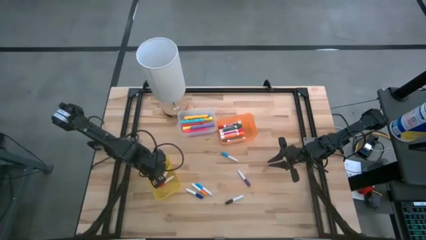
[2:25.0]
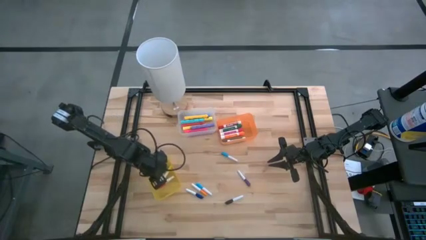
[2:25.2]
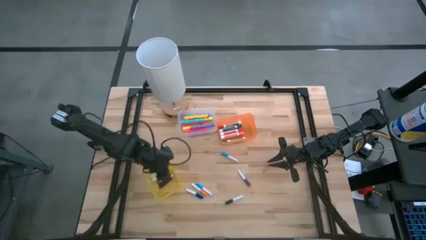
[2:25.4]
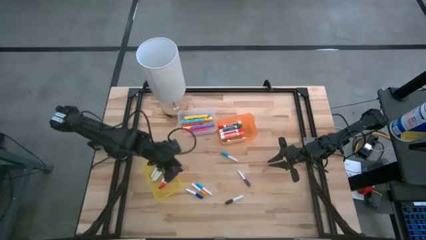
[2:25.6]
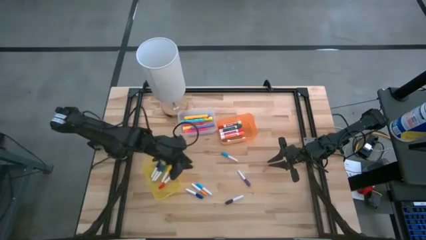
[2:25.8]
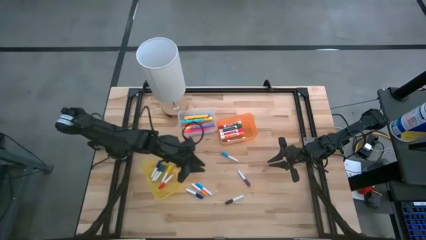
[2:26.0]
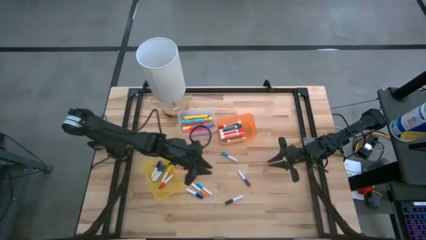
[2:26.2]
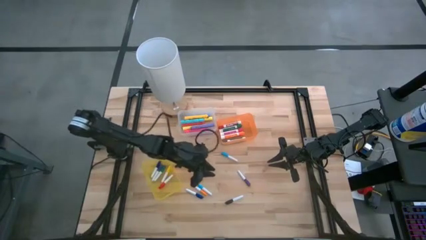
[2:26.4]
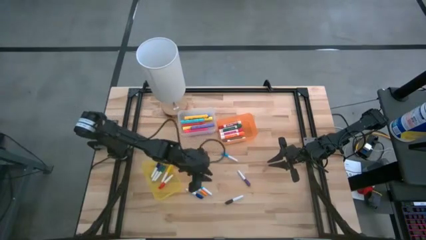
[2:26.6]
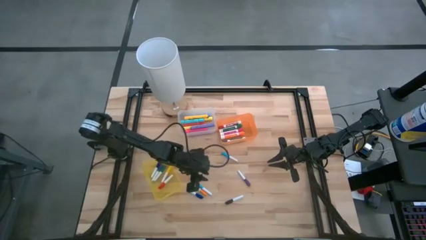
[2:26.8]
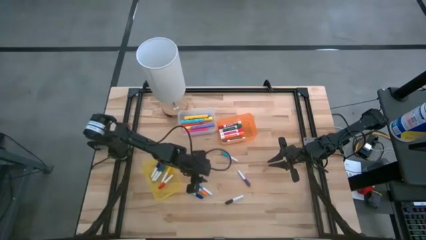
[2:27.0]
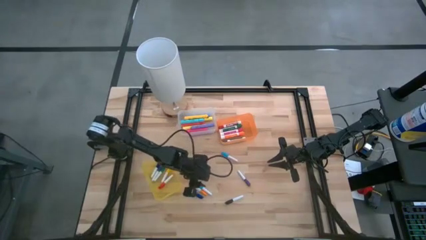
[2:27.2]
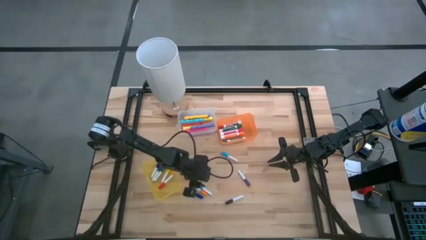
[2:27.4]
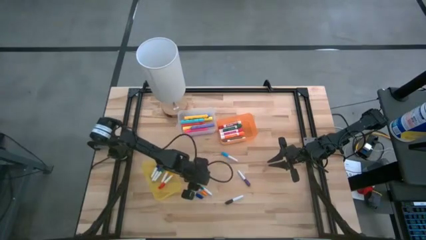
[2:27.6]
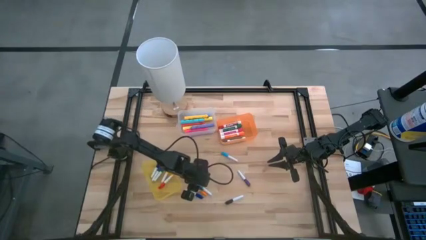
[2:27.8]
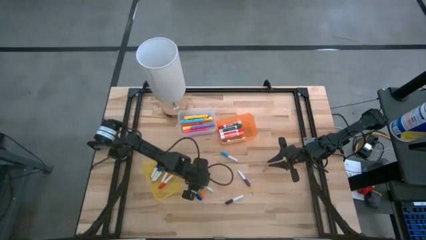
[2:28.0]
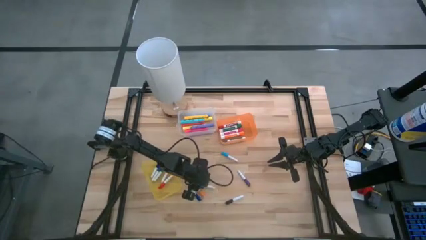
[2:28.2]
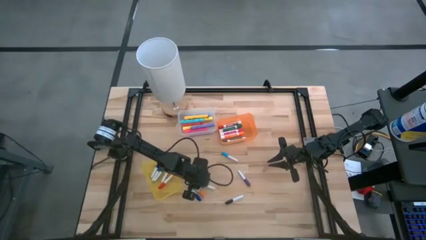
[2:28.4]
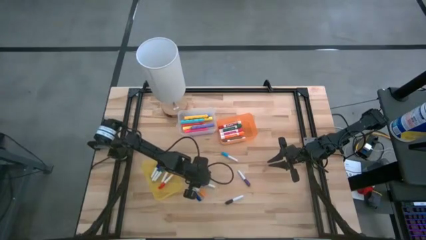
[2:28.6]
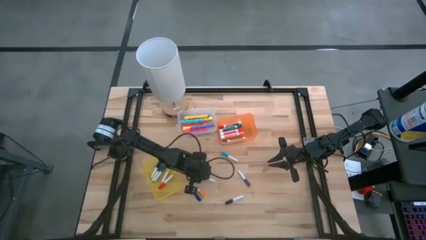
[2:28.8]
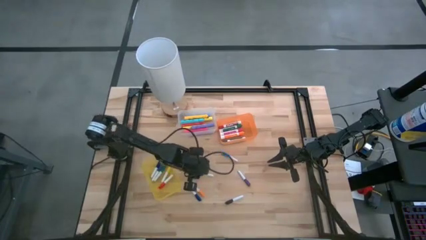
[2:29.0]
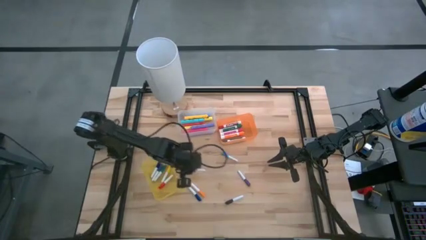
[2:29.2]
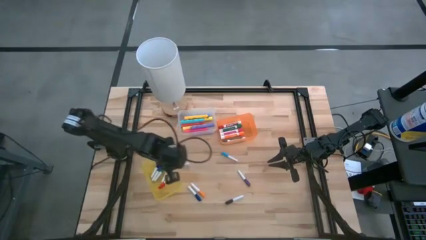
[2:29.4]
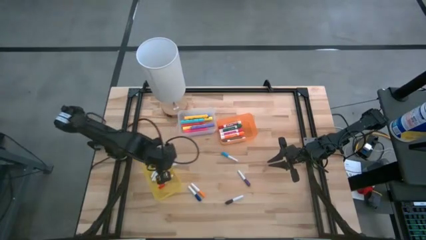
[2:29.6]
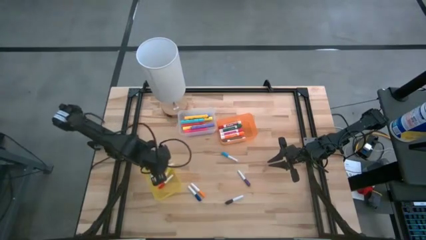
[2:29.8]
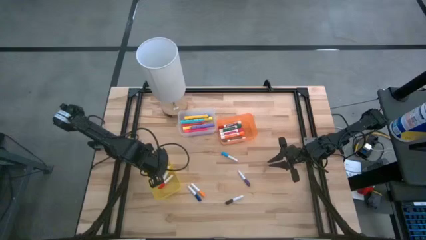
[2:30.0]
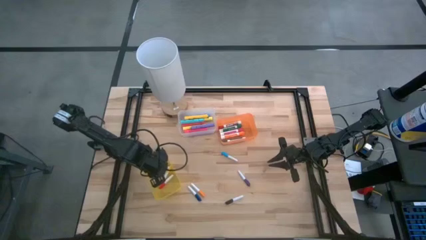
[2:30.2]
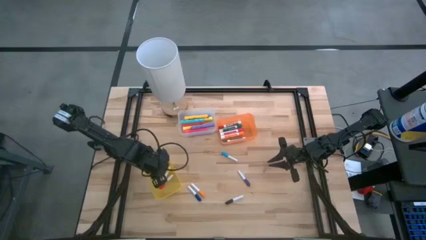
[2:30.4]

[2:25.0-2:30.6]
Task: Pick & Place Markers
Put the bottom light blue pen into the yellow bin

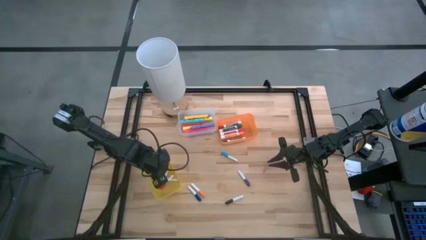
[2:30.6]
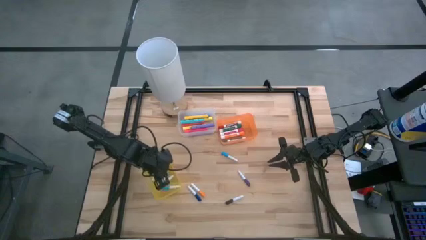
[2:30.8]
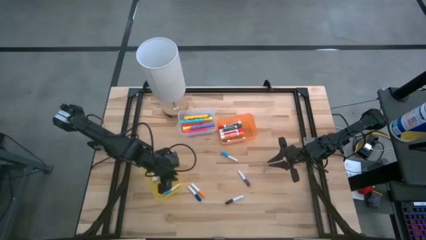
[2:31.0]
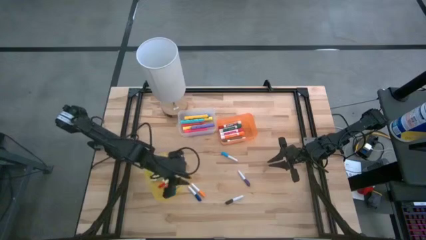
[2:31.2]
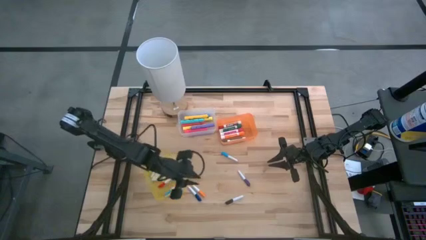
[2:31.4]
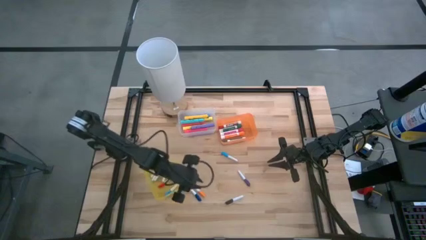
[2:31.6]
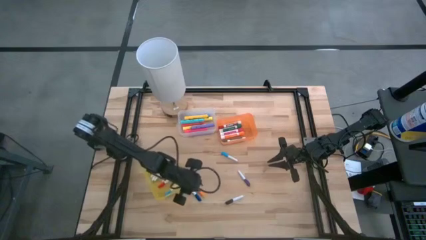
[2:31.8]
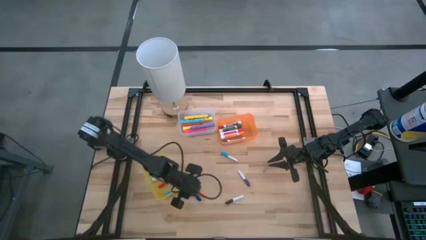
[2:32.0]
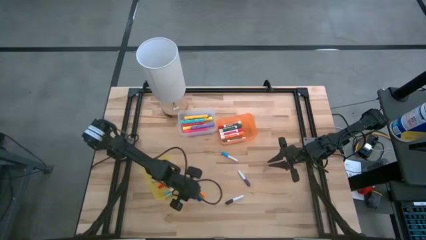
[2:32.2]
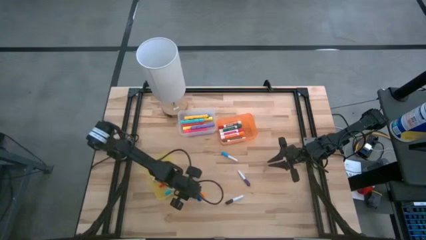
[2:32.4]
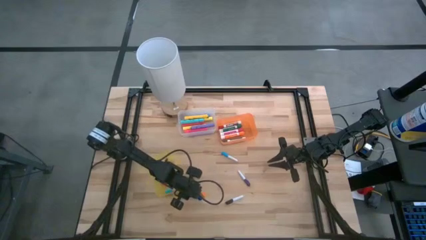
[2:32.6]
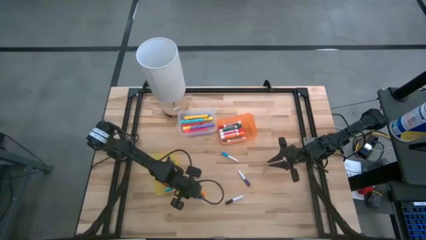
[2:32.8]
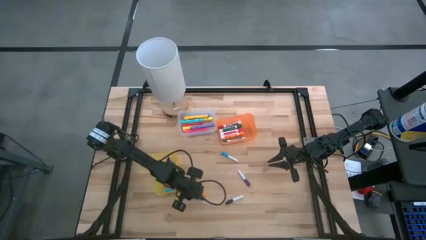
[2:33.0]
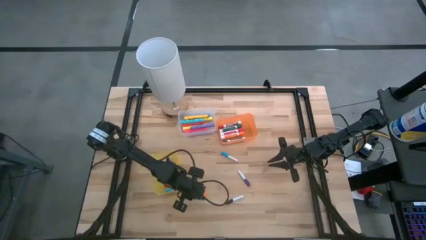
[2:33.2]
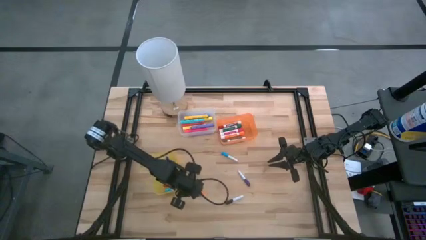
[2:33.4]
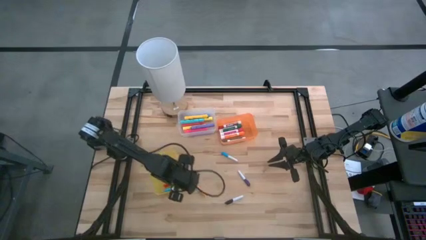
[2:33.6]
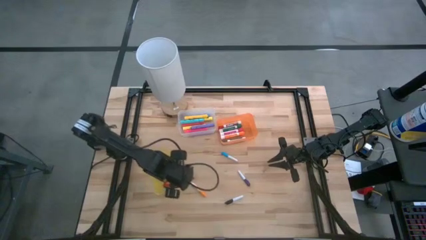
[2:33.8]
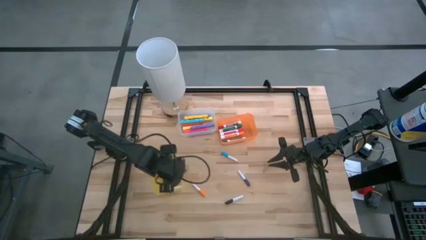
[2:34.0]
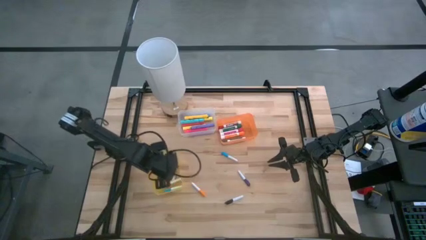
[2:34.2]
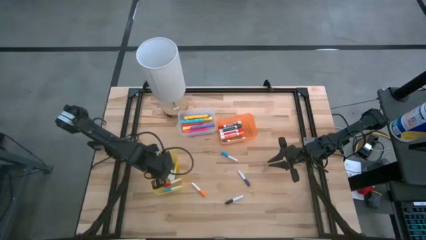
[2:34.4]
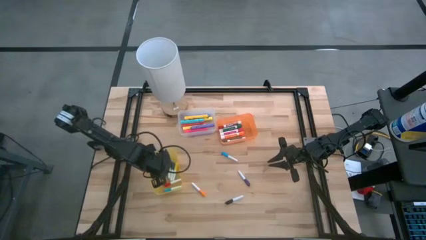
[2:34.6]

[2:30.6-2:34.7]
Put the dark blue pen into the yellow bin

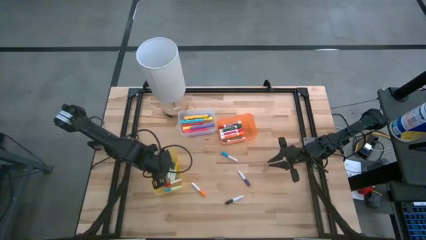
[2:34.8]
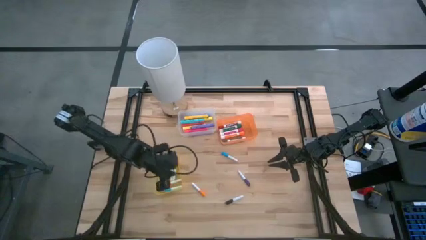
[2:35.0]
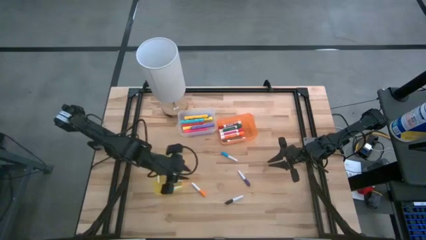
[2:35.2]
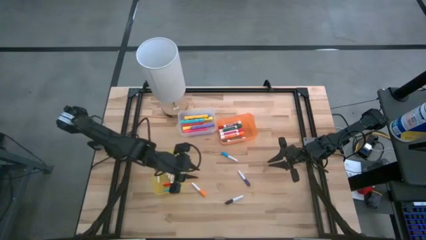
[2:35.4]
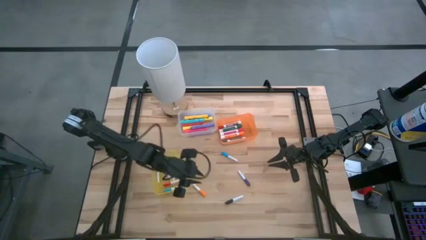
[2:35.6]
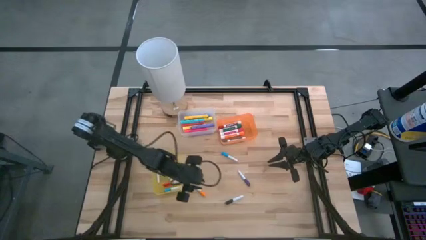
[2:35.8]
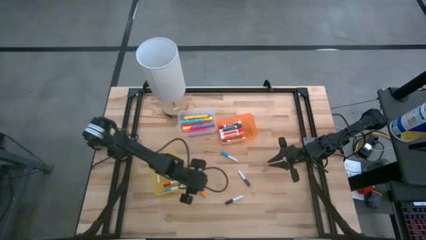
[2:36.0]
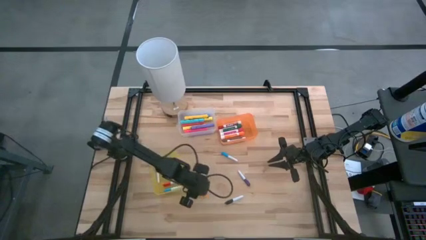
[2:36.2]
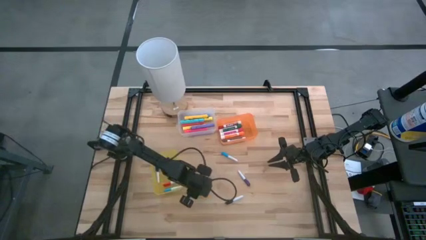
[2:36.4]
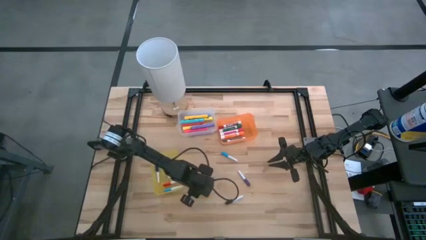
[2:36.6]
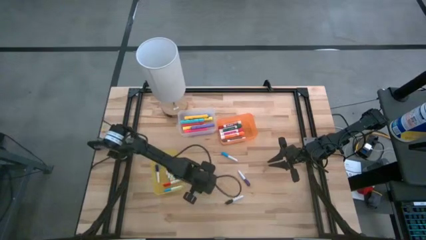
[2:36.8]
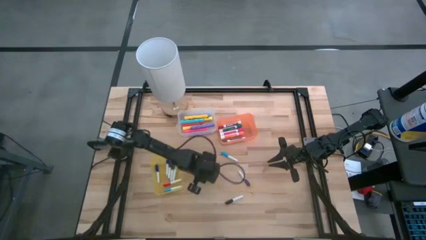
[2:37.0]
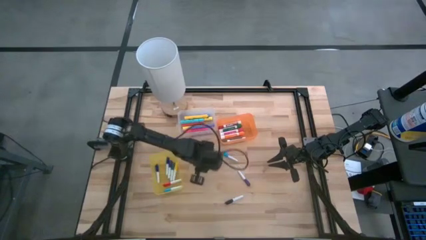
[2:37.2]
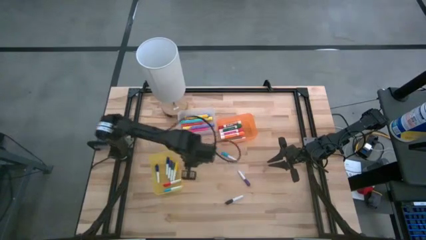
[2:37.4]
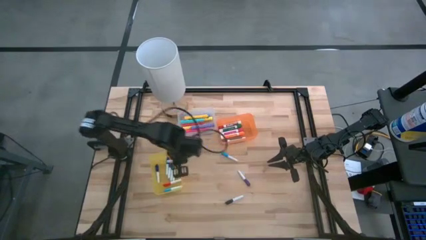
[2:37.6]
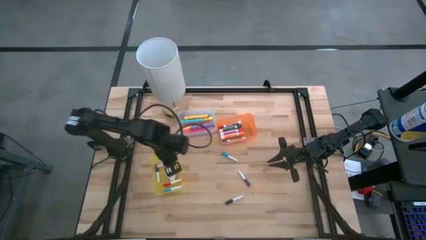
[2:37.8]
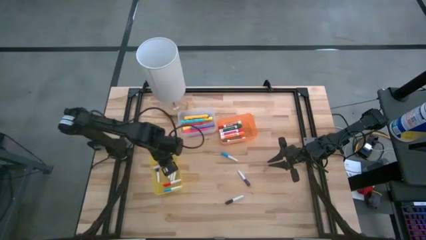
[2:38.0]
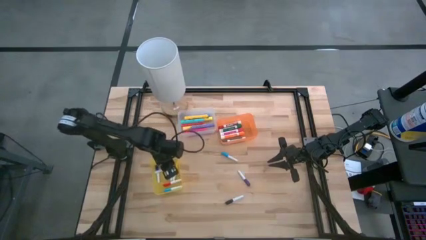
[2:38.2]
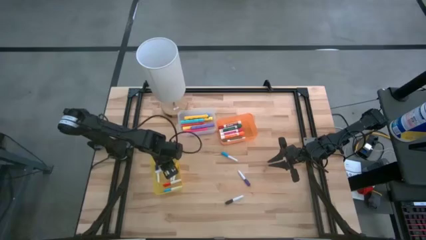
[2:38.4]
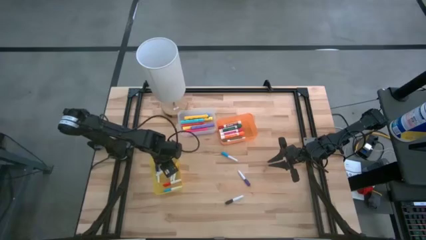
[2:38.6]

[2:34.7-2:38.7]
Put the orange pen into the yellow bin

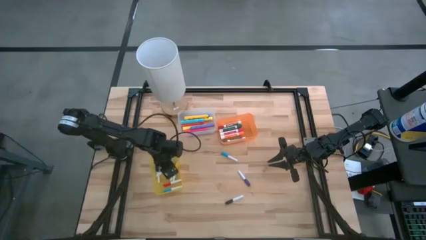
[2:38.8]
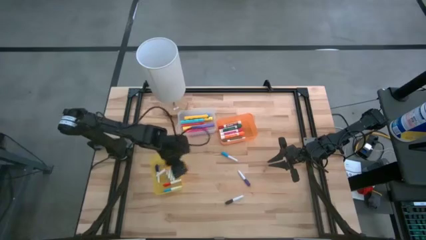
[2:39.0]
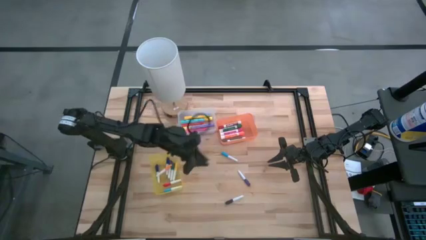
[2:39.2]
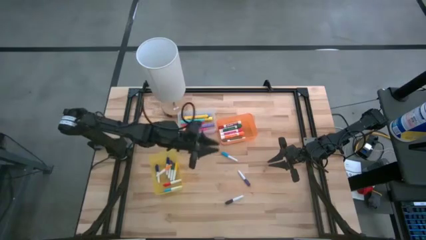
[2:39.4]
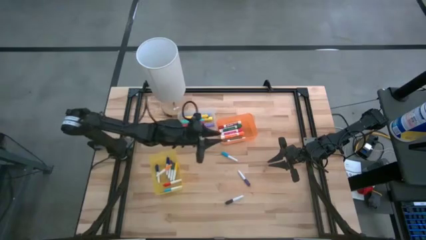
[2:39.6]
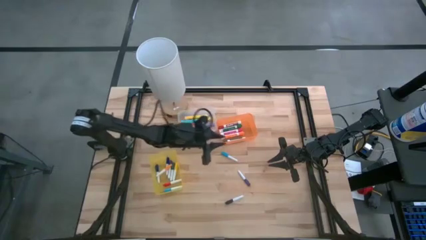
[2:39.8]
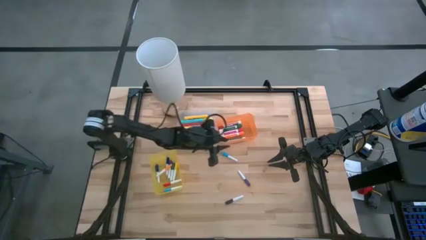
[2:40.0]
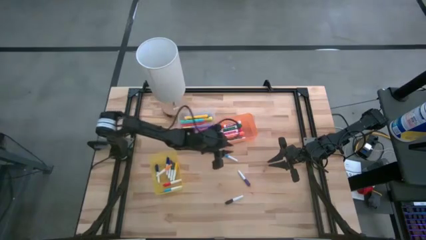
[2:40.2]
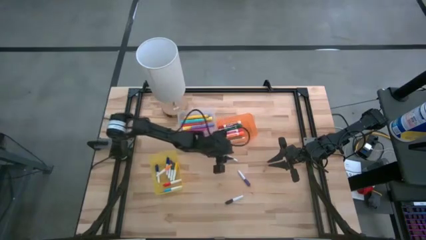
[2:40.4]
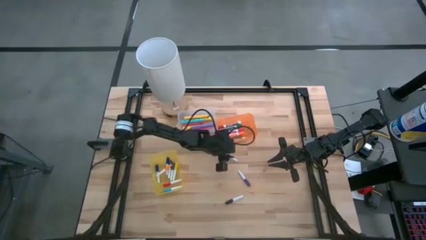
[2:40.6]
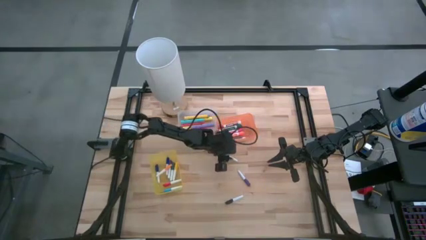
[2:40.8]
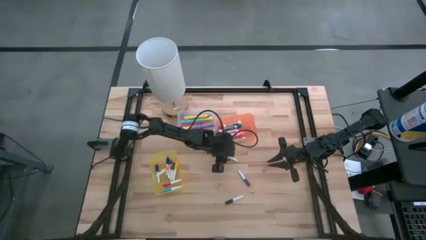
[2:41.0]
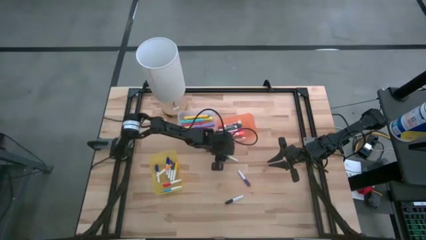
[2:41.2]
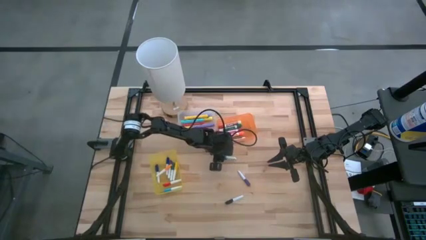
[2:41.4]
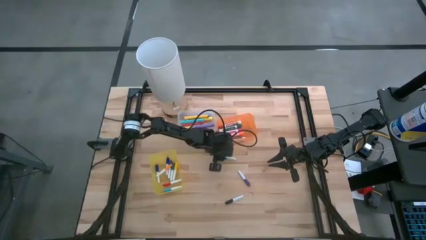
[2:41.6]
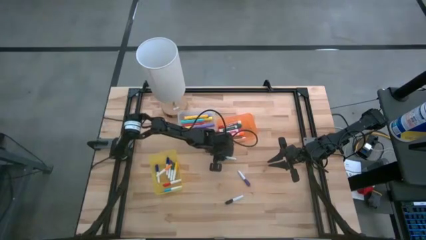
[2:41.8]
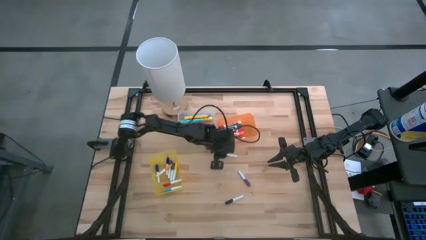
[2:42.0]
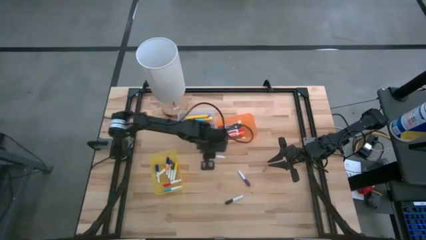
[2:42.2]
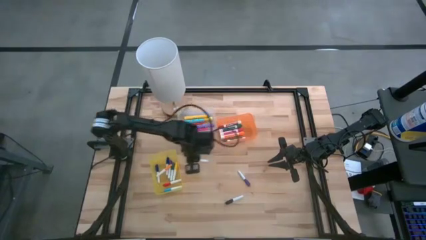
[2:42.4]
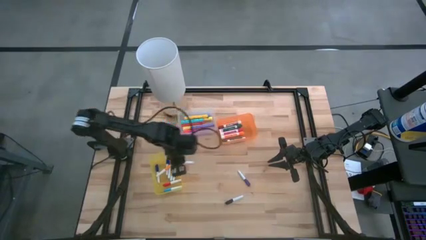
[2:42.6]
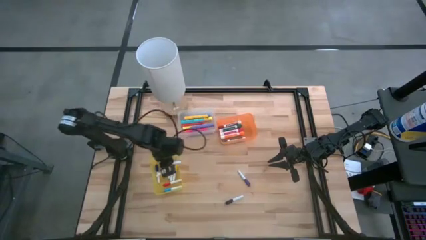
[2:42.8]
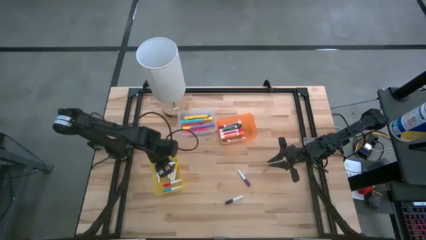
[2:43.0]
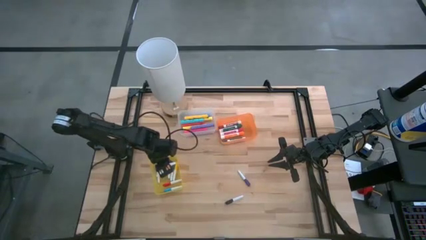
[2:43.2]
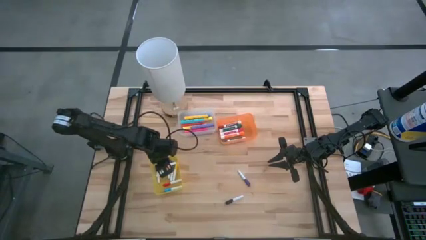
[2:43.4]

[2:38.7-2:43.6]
Put the light blue pen into the yellow bin
